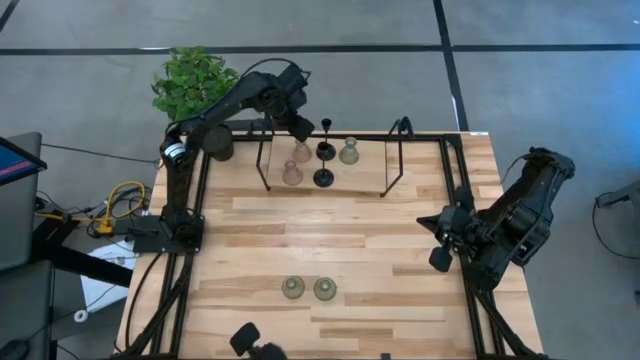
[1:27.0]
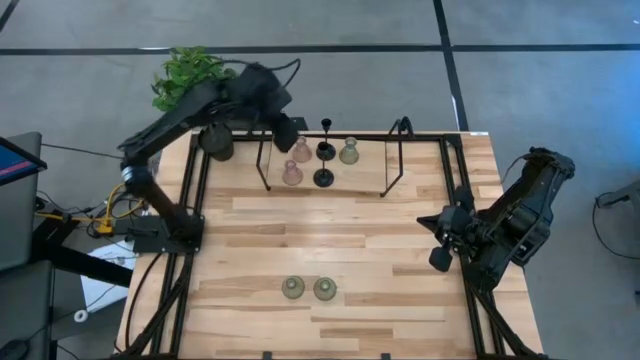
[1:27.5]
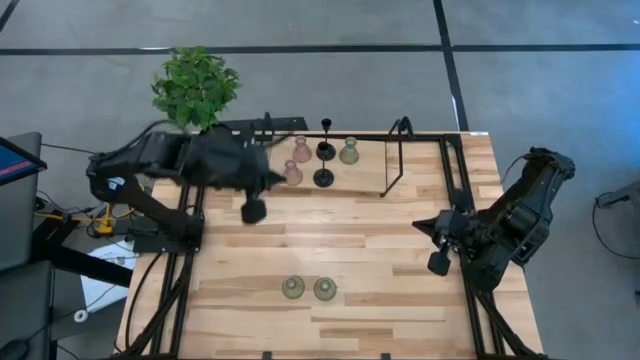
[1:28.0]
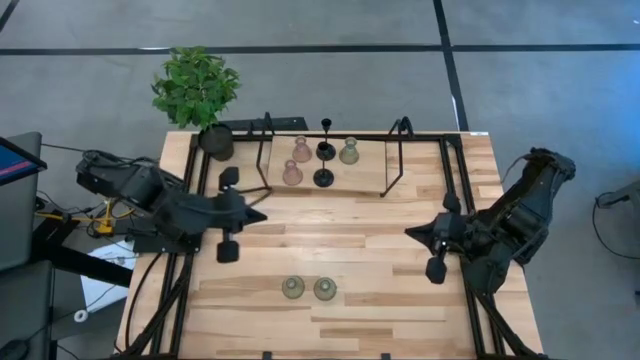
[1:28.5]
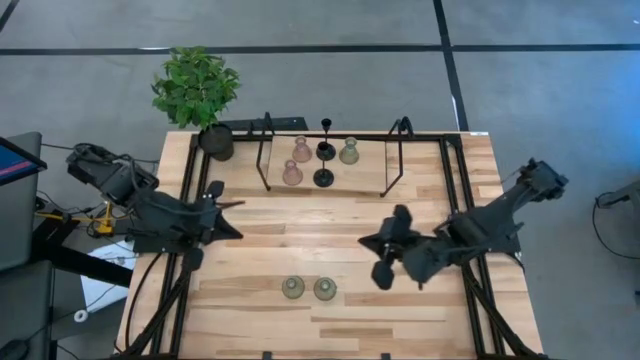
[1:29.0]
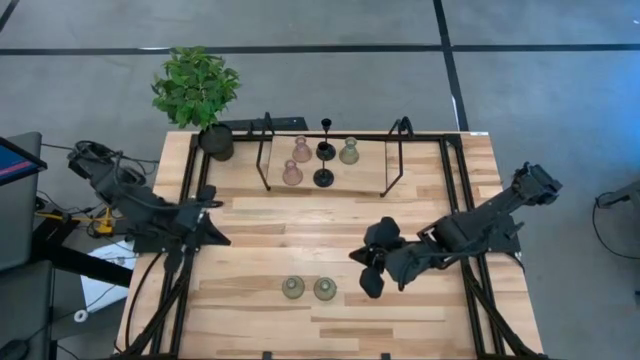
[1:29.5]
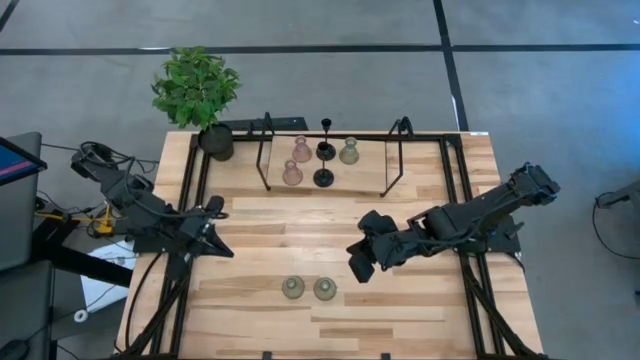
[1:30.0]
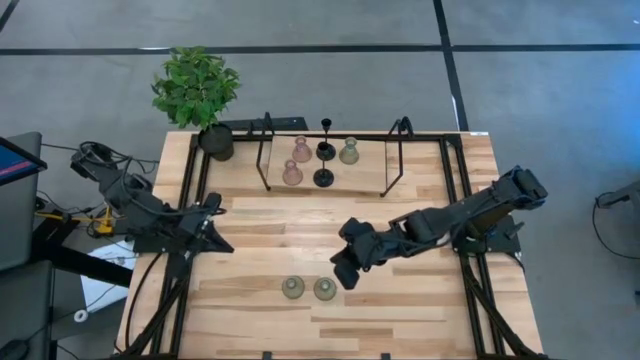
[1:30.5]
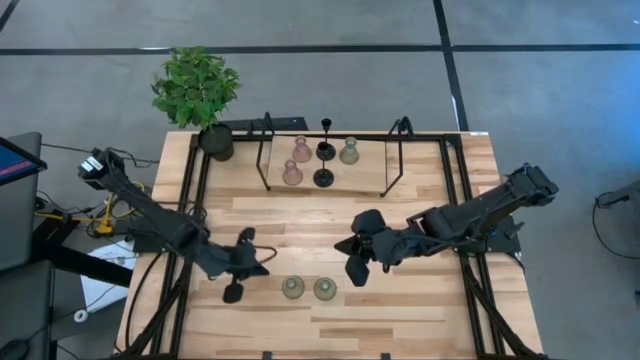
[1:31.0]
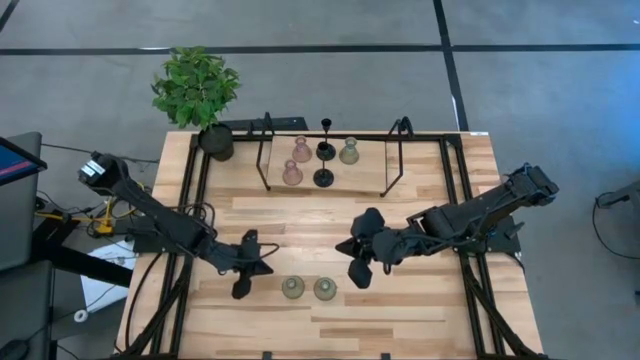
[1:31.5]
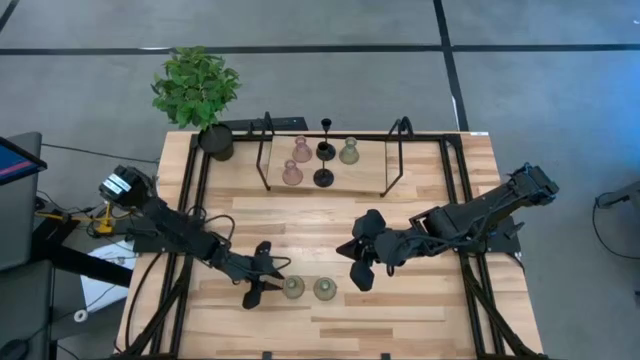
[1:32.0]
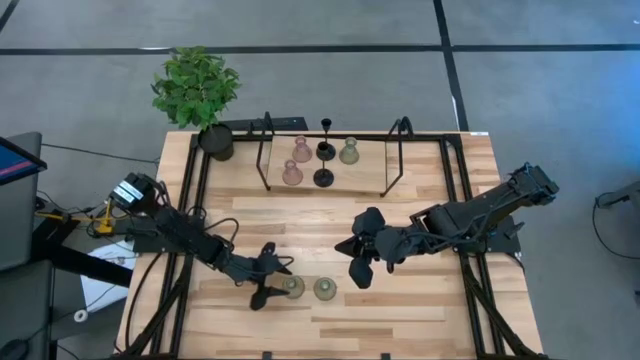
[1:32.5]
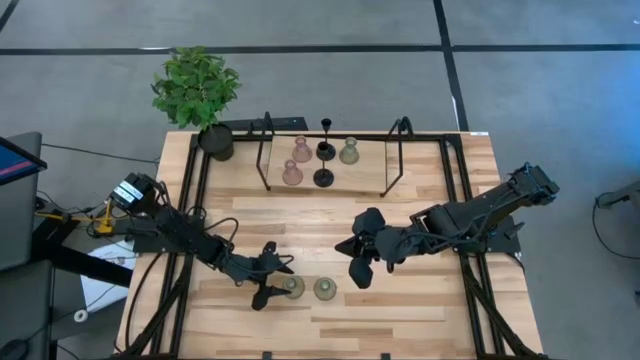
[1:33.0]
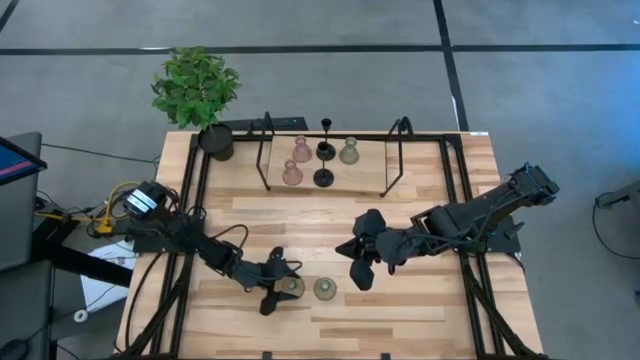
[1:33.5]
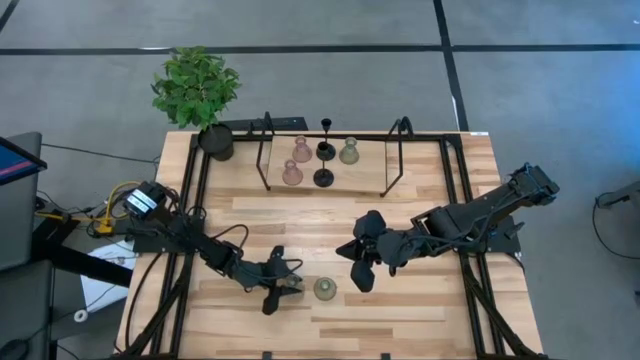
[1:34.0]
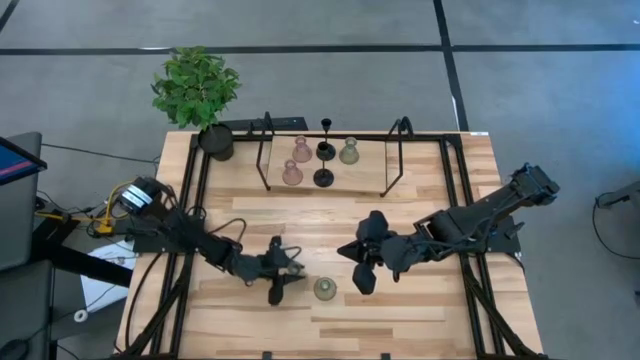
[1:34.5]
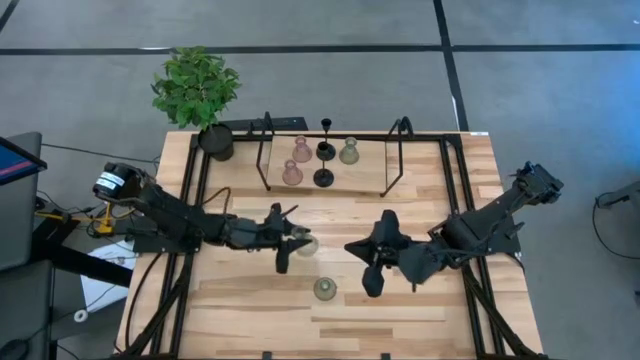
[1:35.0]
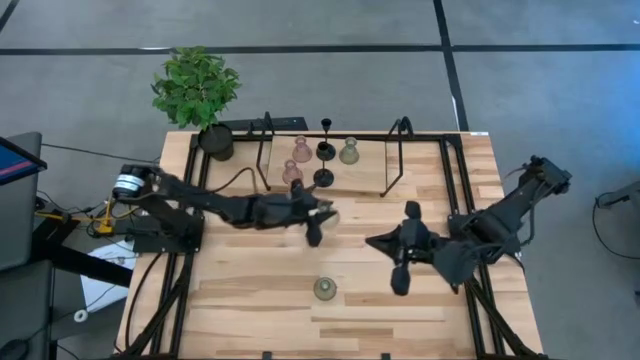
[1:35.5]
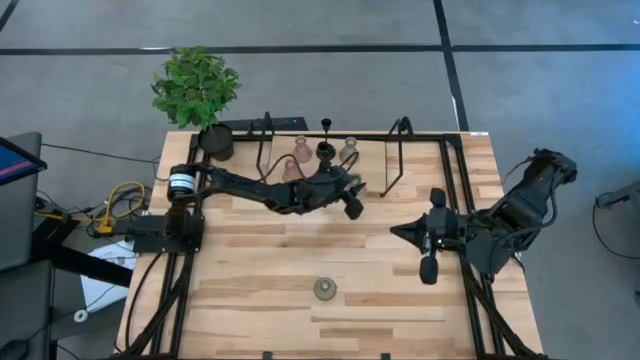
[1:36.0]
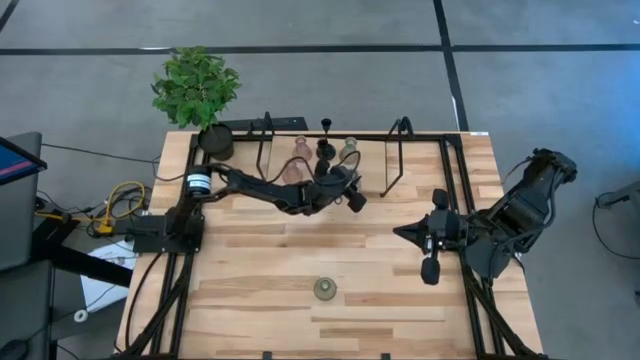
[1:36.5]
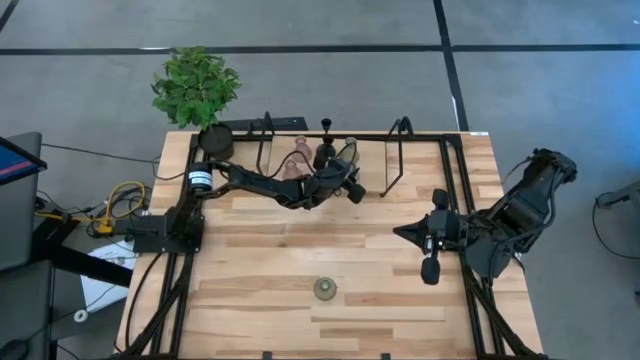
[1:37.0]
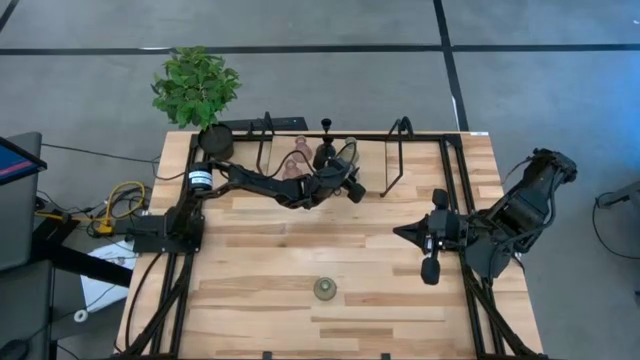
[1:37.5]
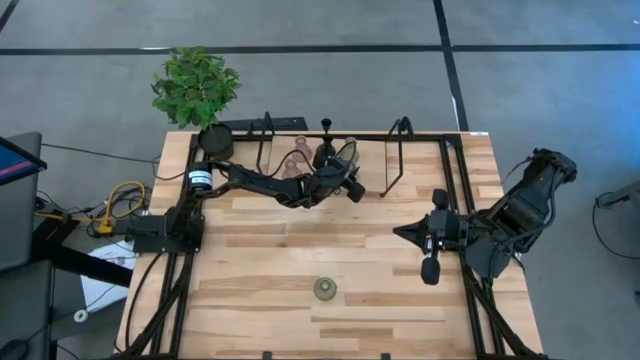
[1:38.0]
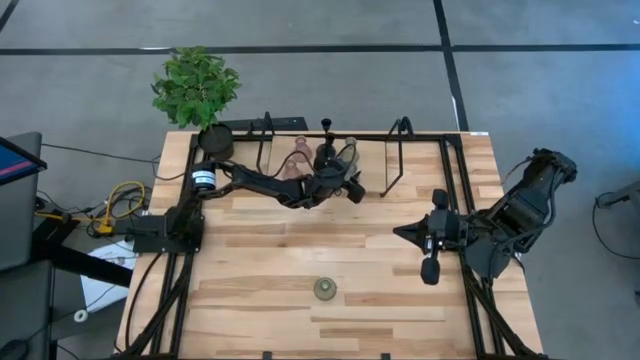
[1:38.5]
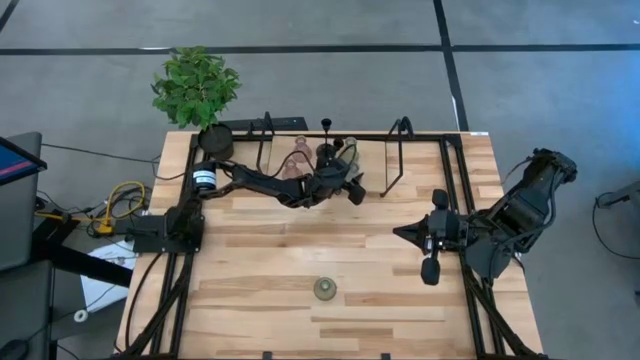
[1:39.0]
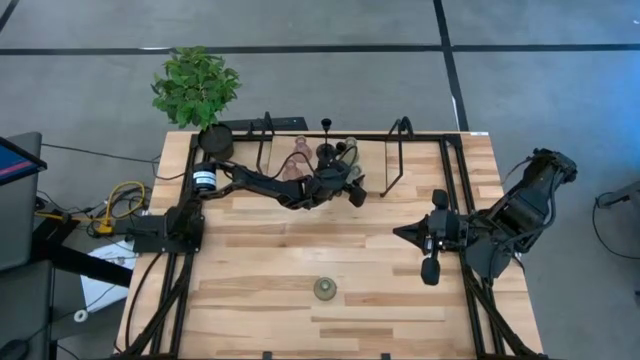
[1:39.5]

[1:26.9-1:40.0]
Task: Pick & Place candle stick holders
Put the green candle holder on the shelf aligned with the green candle holder

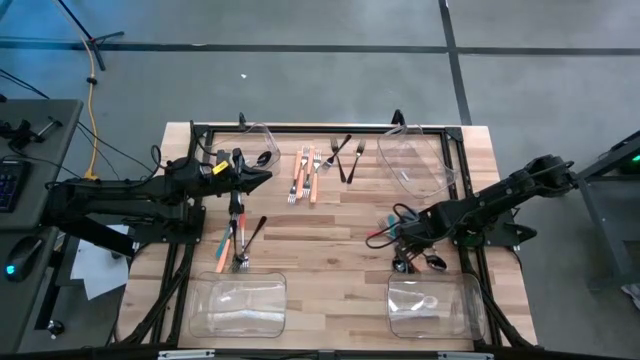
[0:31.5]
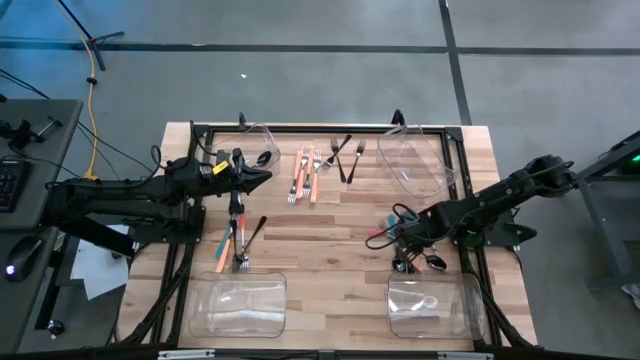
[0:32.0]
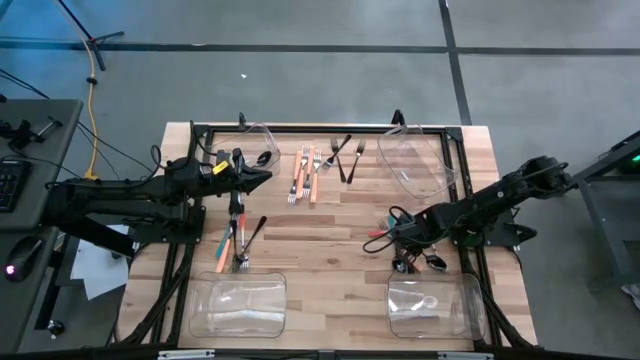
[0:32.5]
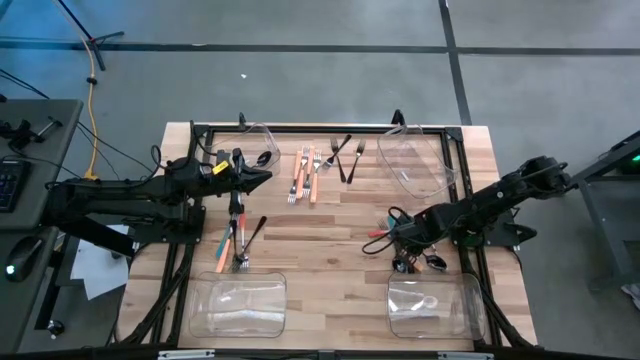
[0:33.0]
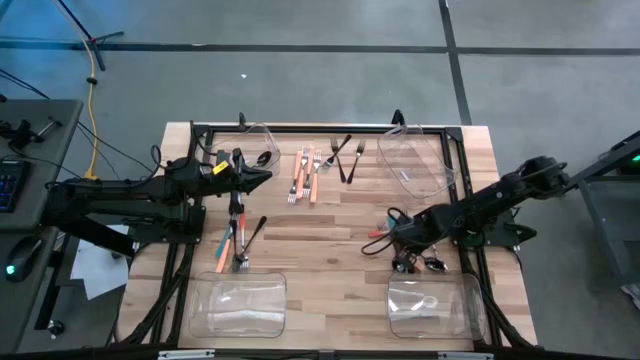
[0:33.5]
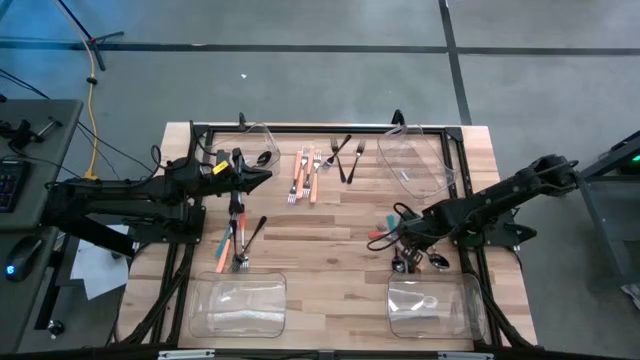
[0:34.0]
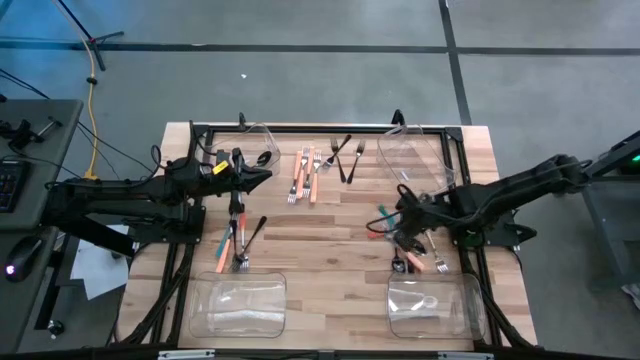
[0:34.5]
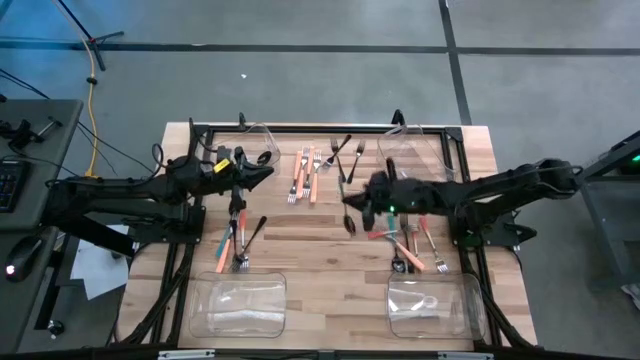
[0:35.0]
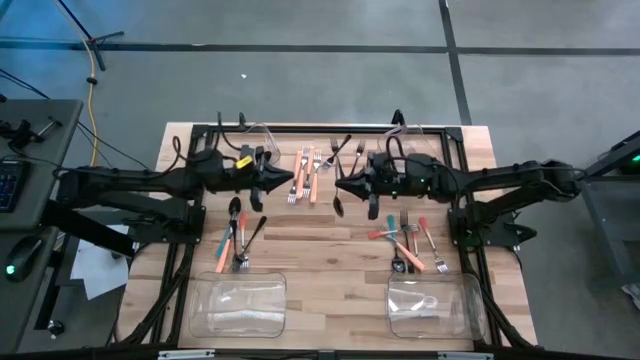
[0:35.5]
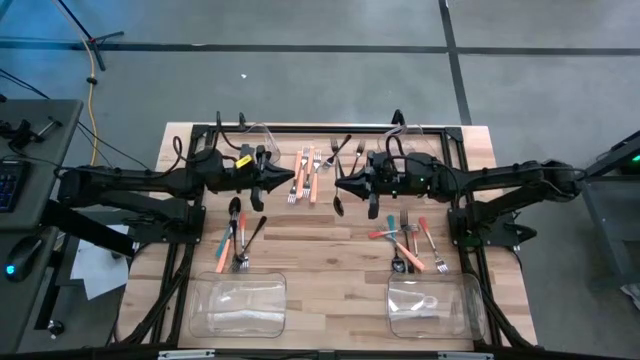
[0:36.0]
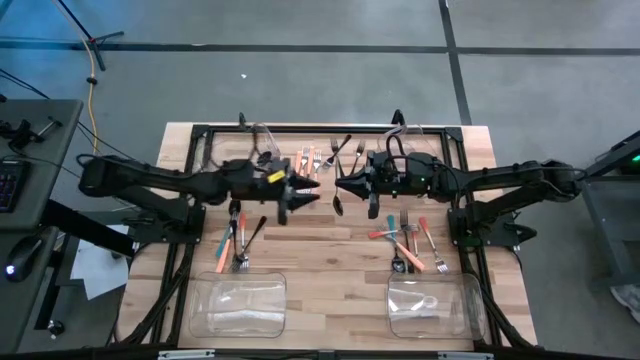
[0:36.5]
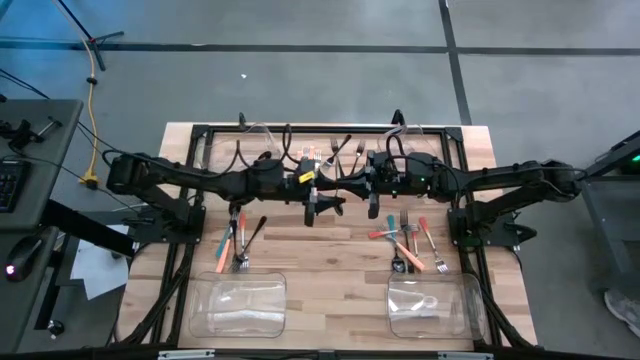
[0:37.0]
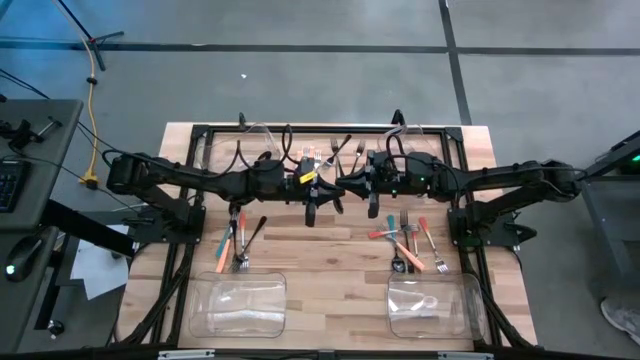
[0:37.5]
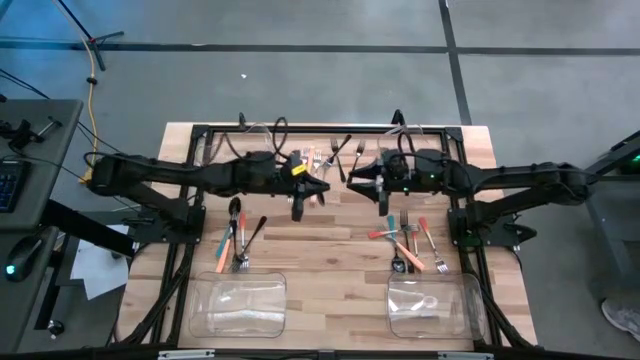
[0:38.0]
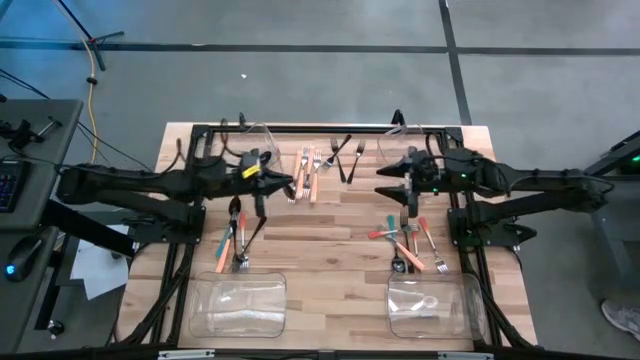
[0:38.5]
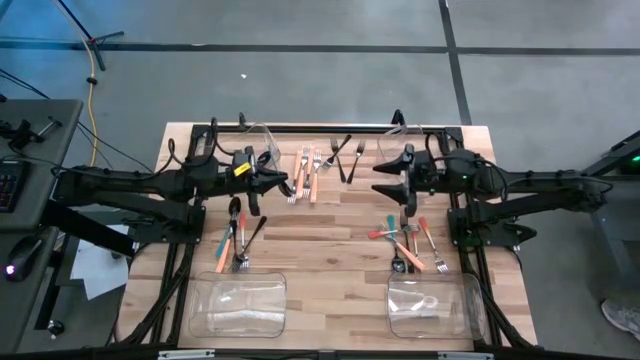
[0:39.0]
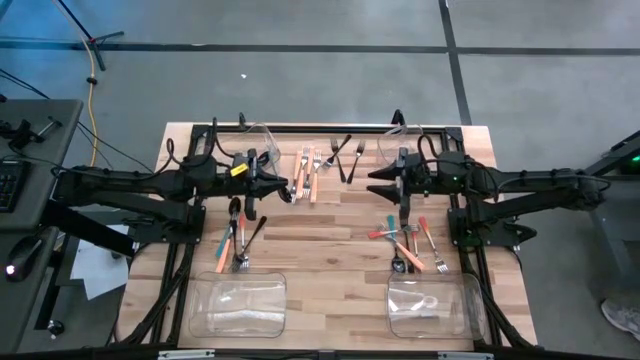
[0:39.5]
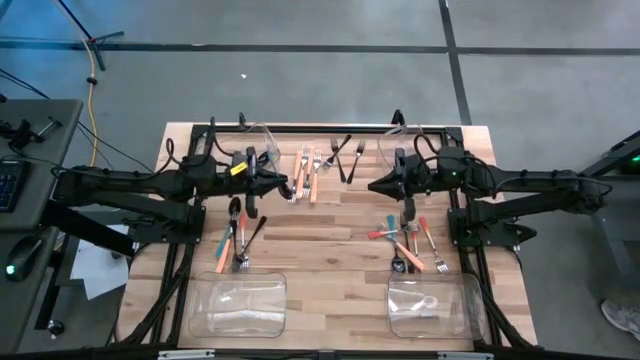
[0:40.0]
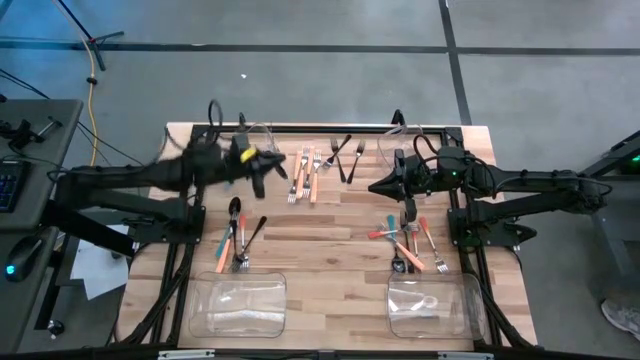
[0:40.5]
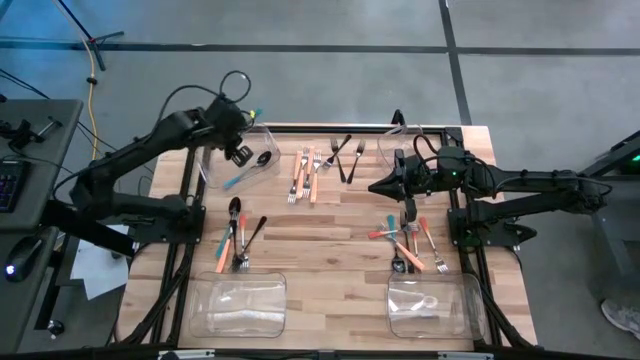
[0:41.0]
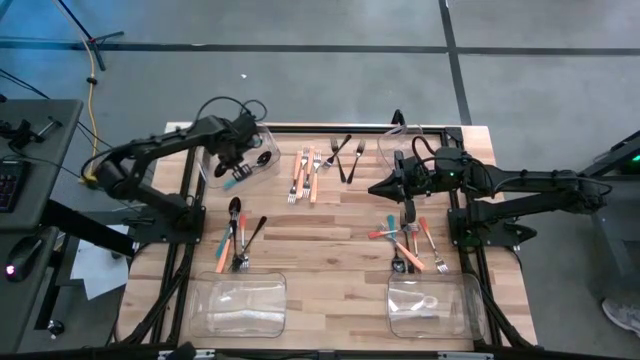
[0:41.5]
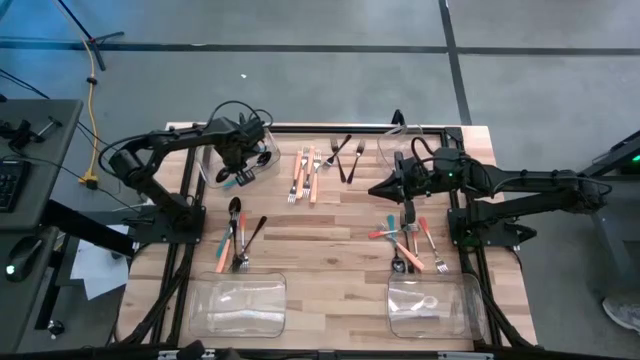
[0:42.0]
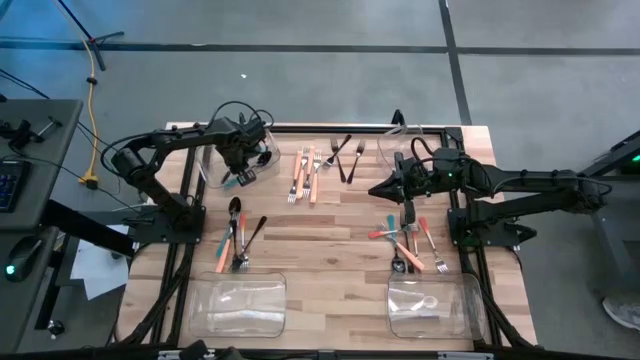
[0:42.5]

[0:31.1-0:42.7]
Task: Sort silverware by color (type)
Put the blue spoon into the top left transparent bin
